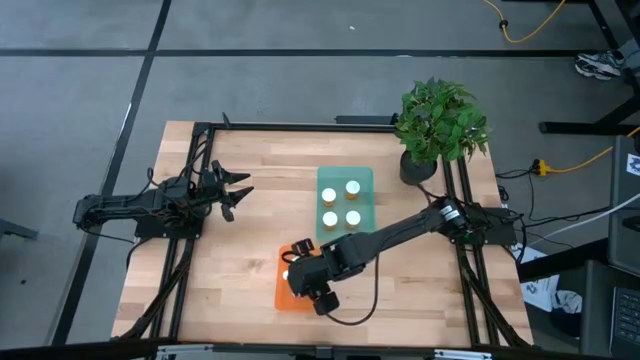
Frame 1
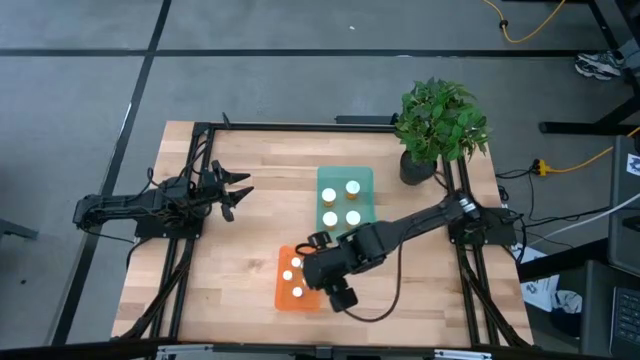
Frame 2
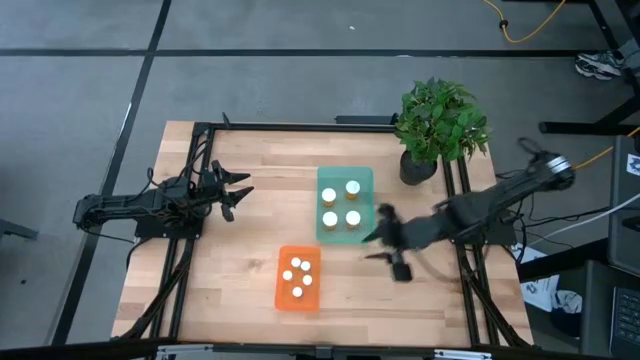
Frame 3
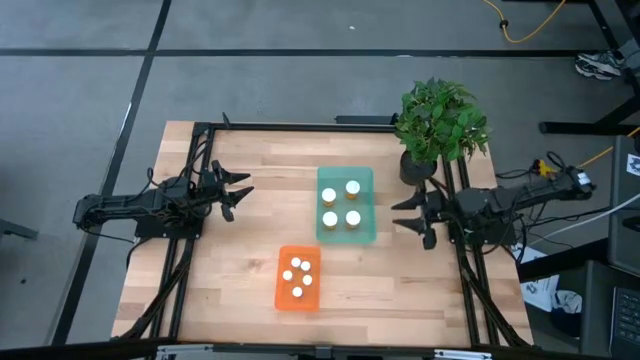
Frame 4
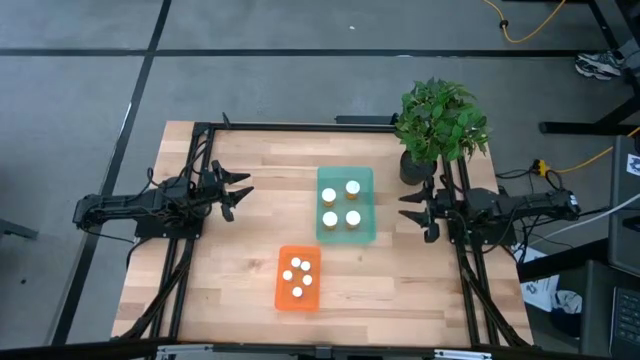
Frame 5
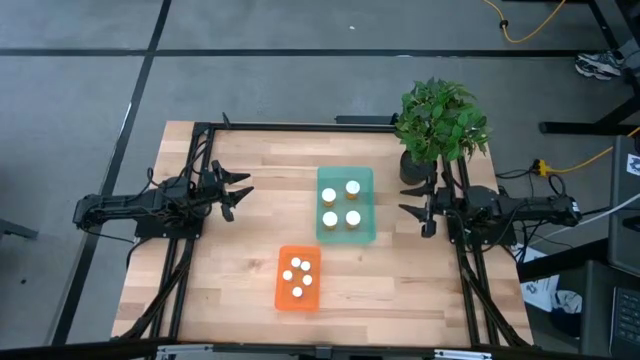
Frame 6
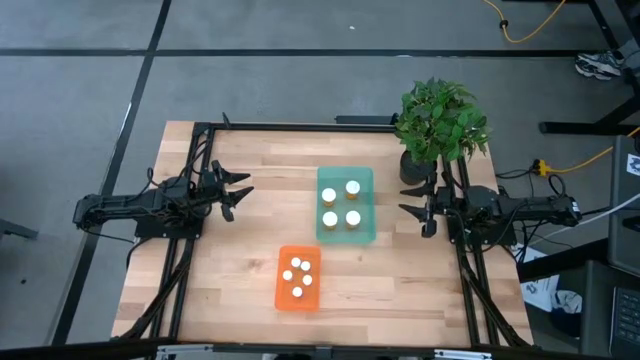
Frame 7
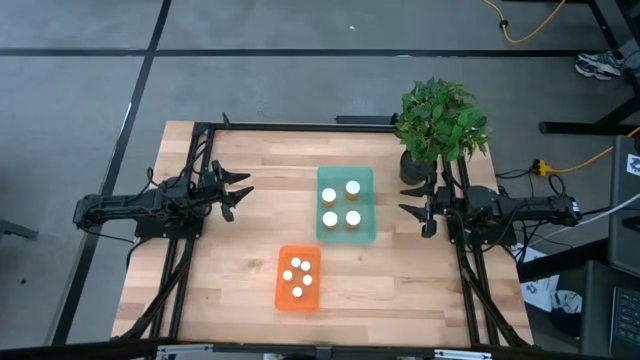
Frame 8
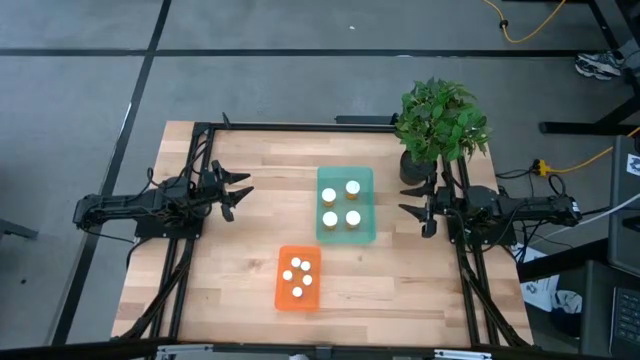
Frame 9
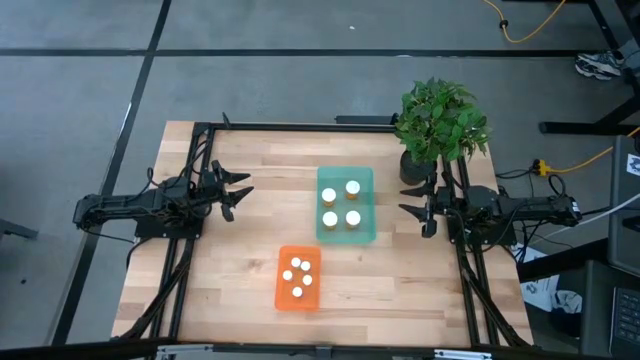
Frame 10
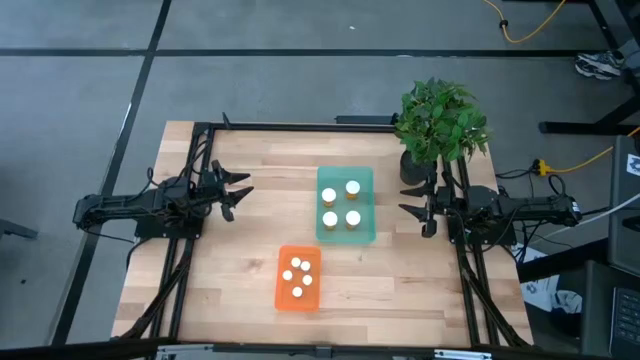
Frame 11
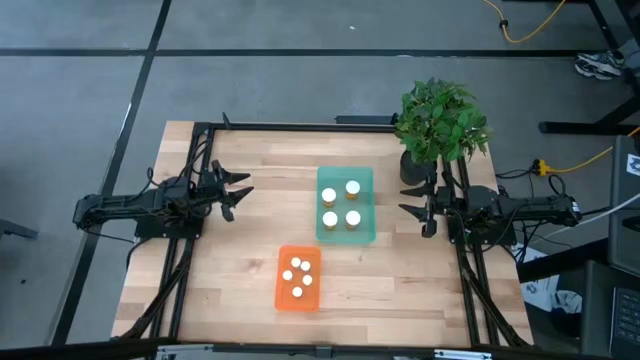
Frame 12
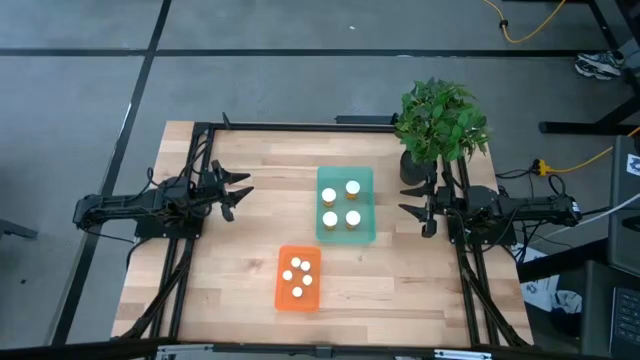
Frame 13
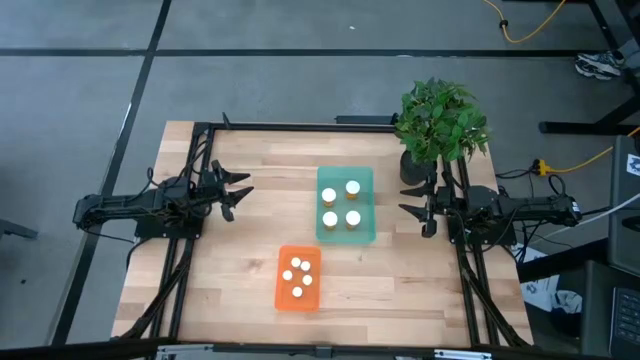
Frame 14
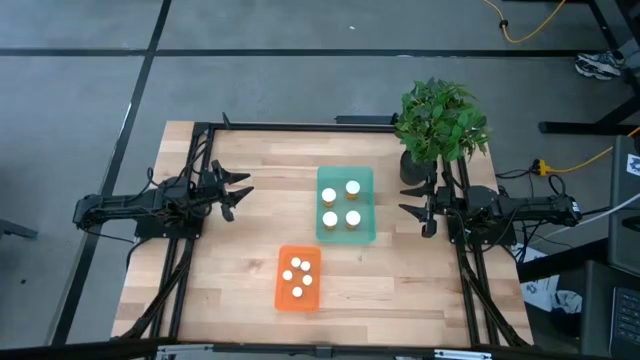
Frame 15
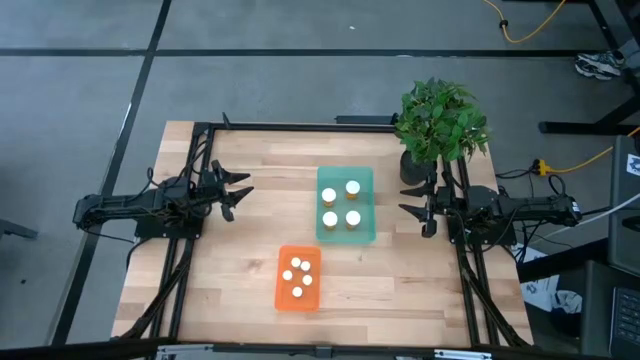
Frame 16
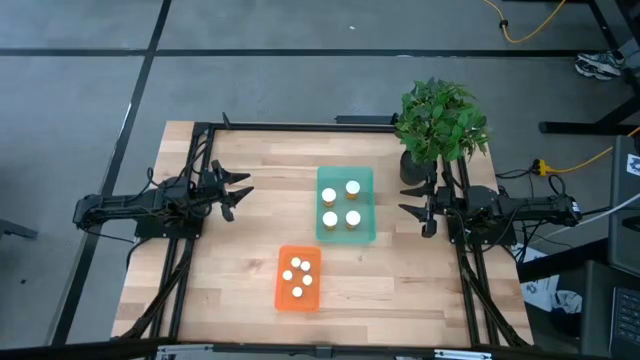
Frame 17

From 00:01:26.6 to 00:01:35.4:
Task: Pick and place medicine bottles into bin by pill shape (circle, oval)
Return to Home Position

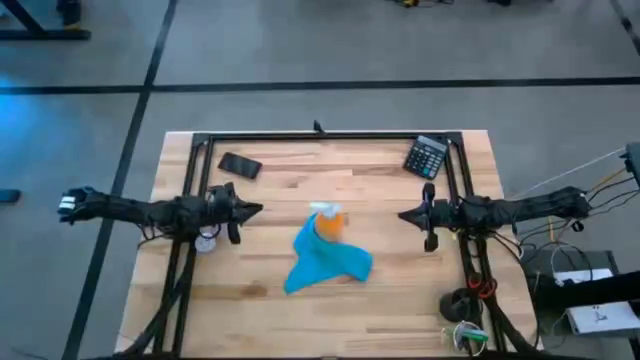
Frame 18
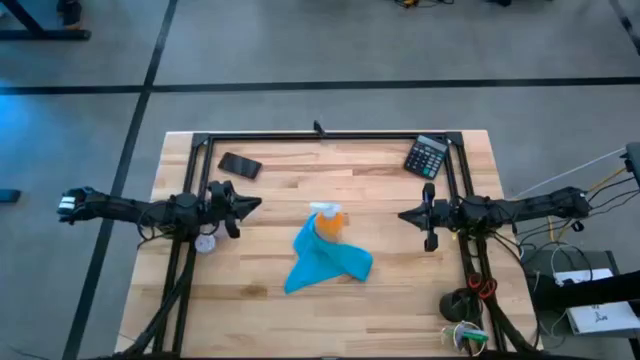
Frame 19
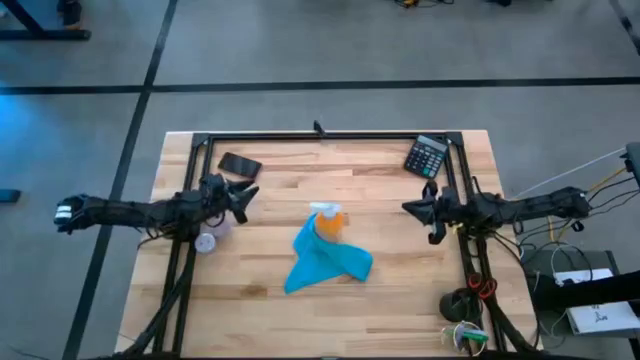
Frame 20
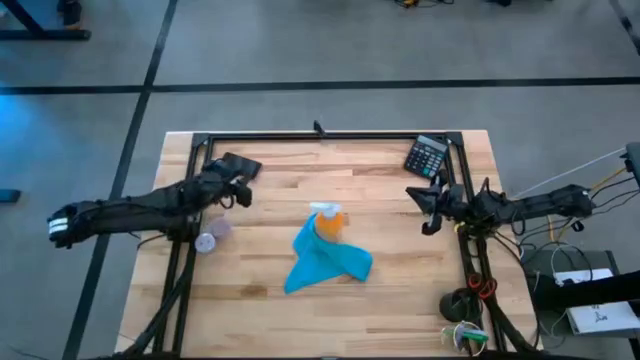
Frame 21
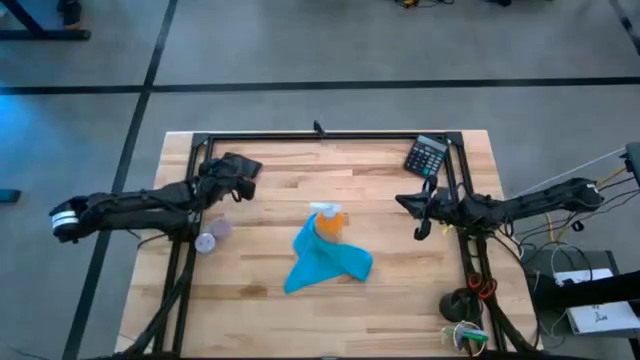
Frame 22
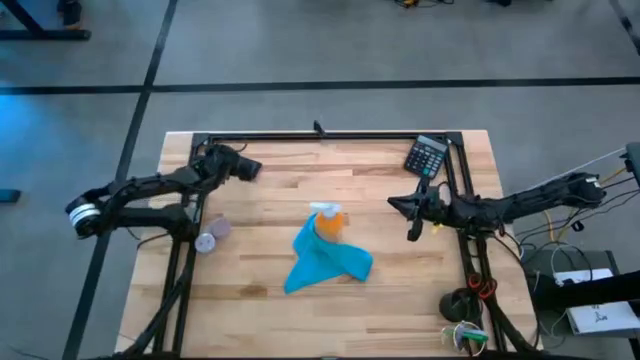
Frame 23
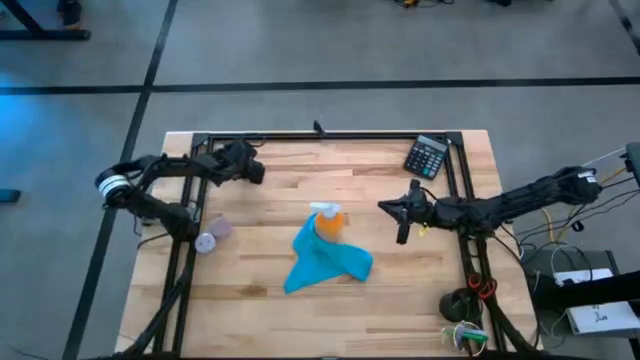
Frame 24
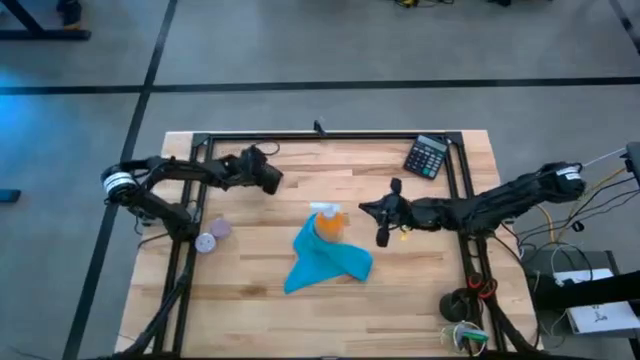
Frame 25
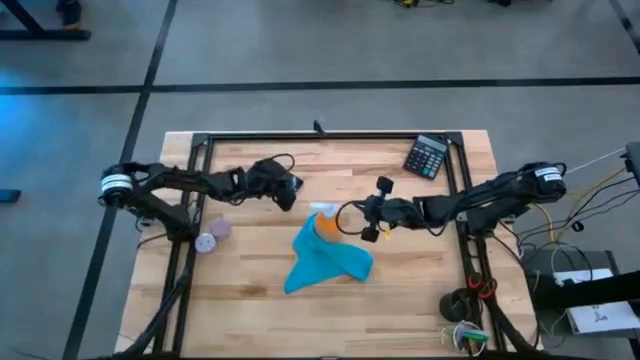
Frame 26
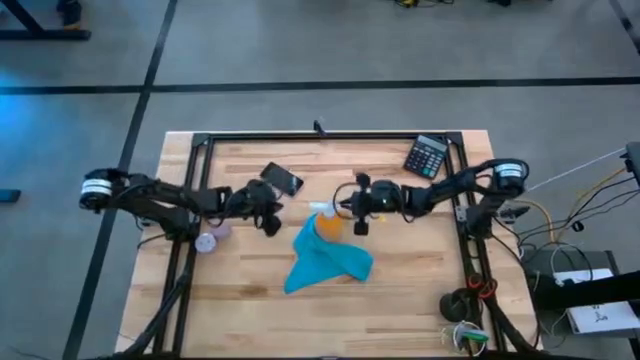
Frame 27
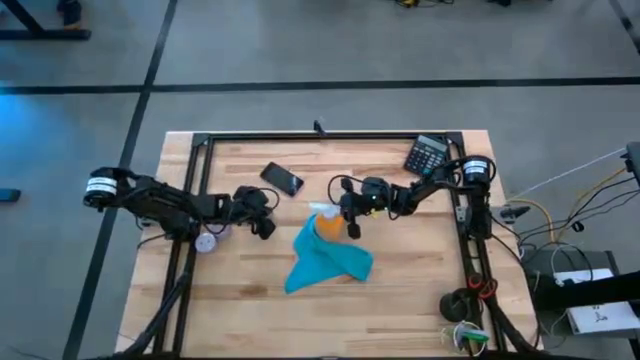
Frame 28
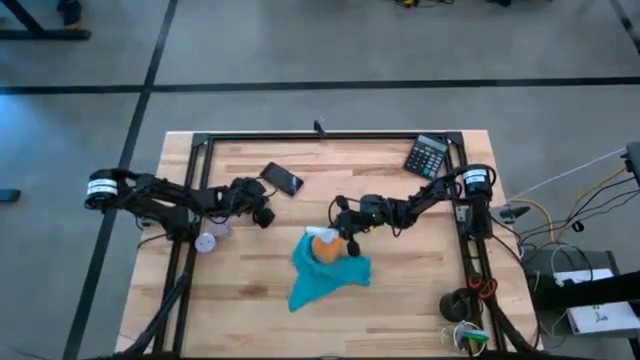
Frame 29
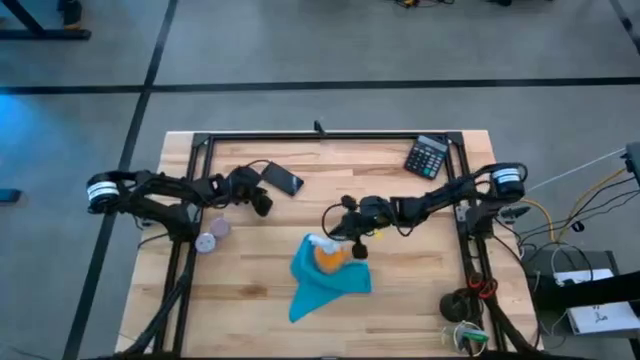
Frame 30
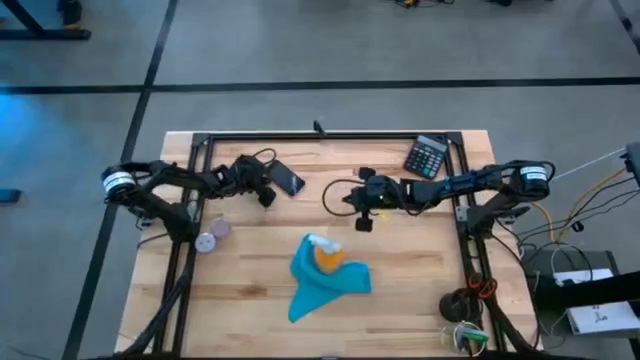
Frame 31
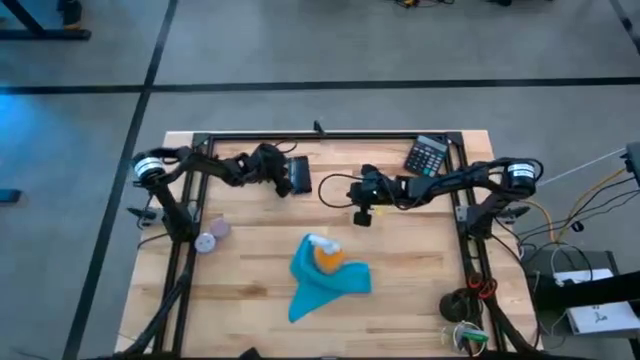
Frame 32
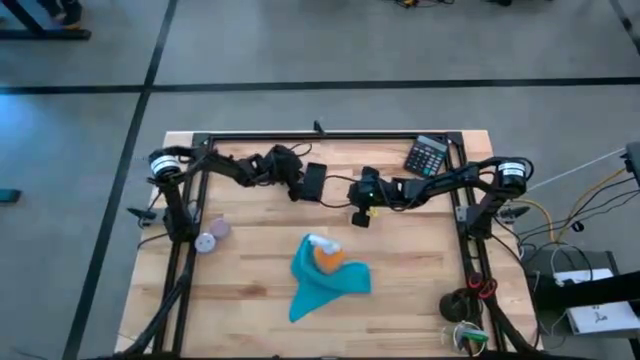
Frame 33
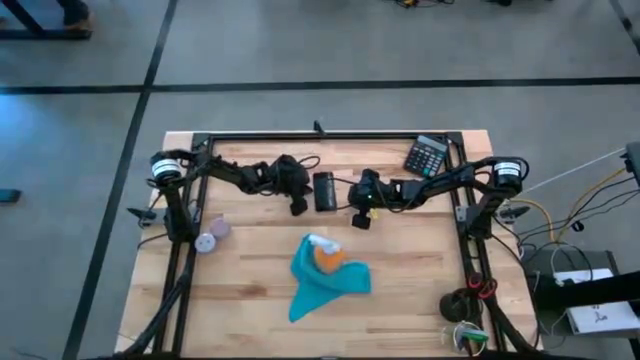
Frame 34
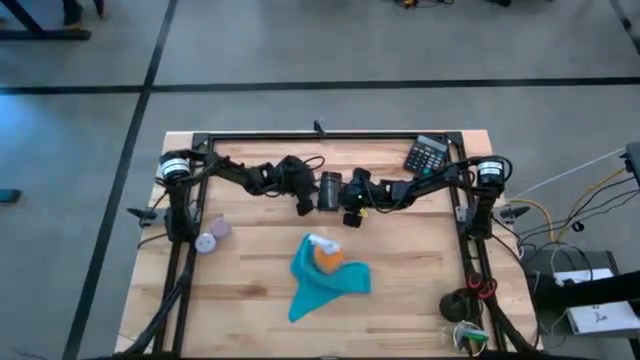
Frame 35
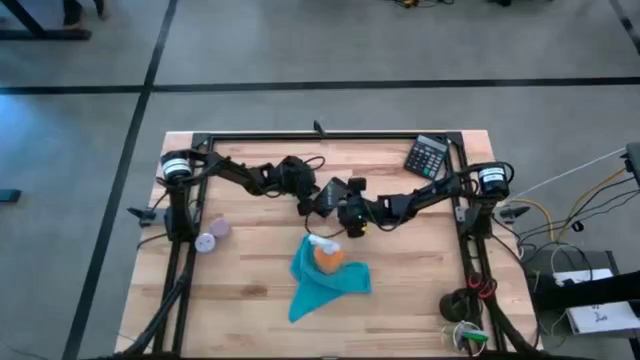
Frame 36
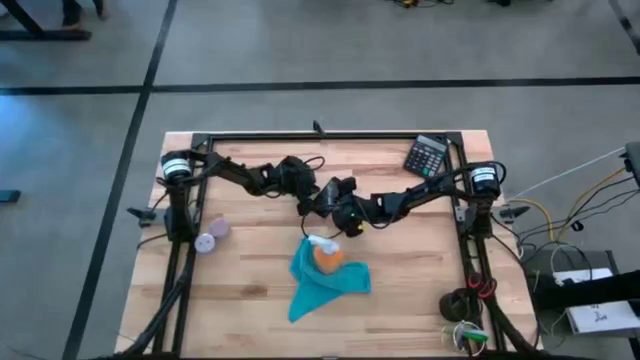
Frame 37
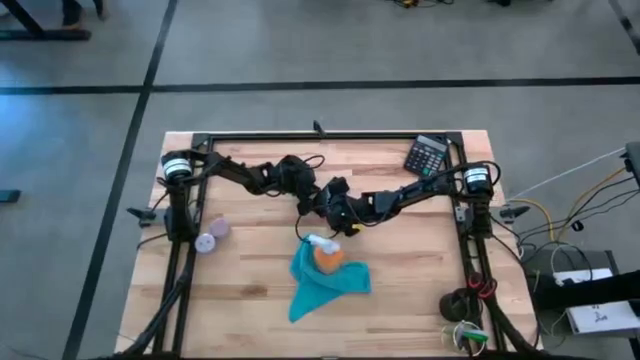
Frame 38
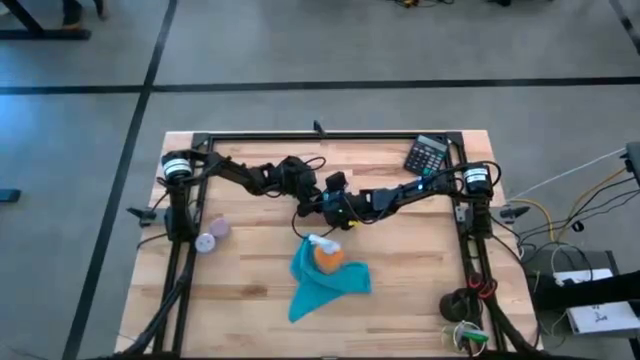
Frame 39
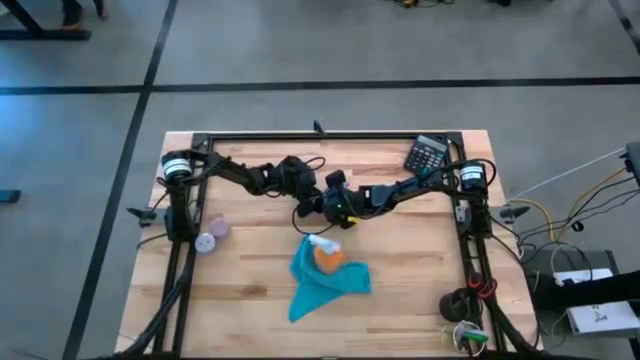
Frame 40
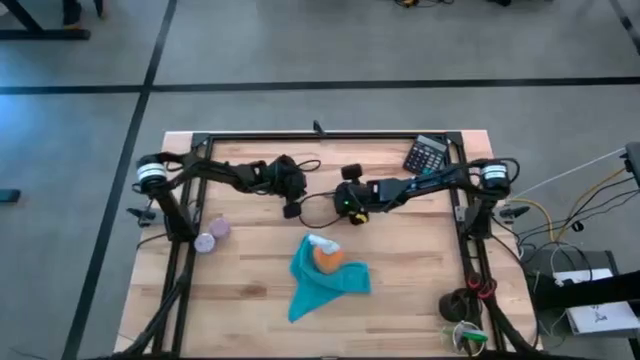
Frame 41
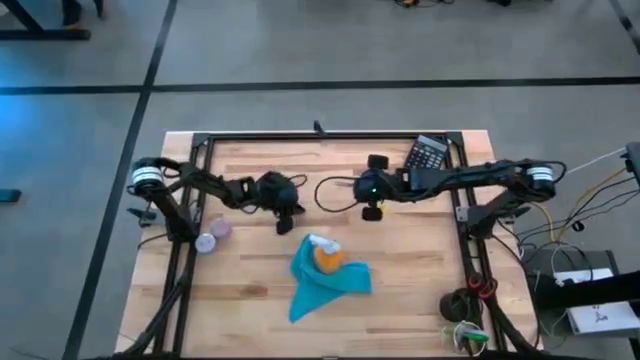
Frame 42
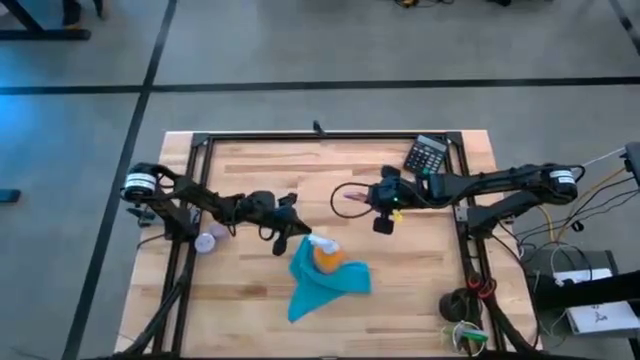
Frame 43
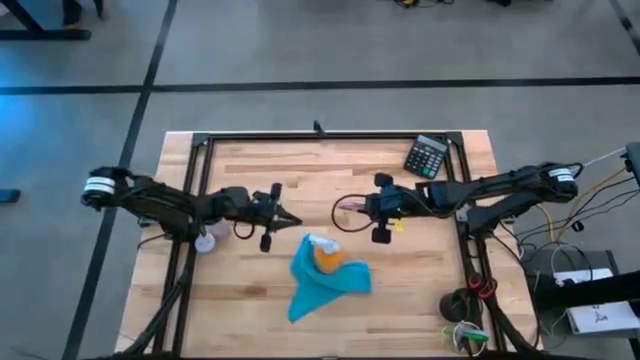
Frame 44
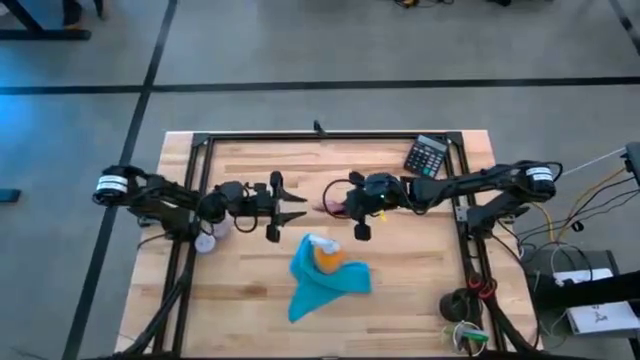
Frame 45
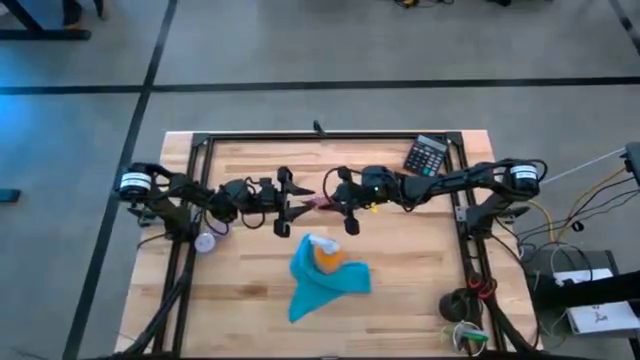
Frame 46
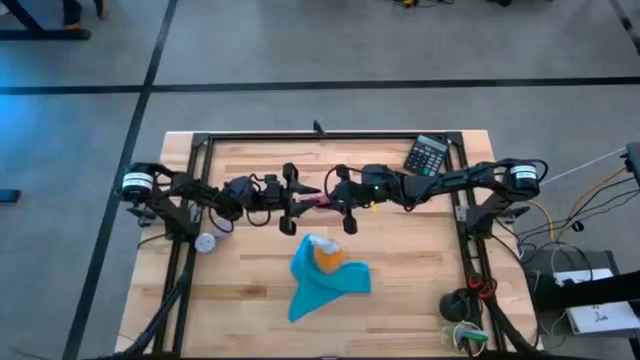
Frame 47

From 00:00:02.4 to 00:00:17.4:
Task: Apply microfiber cloth
Spray the front of the pink cellphone using yellow spray bottle
